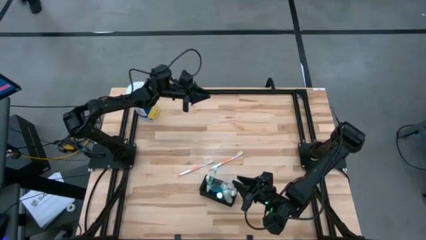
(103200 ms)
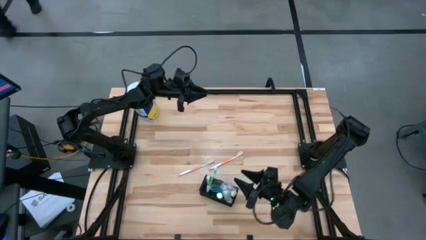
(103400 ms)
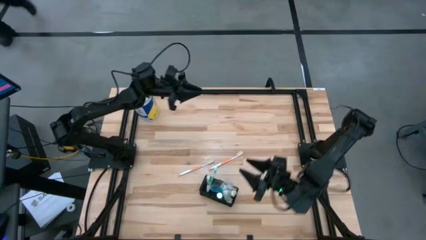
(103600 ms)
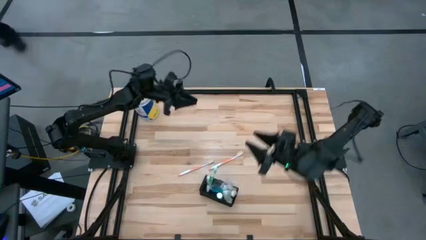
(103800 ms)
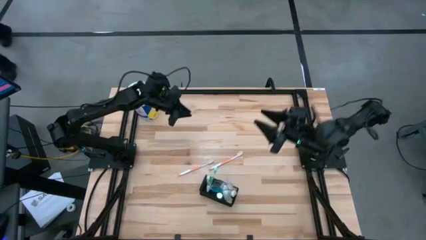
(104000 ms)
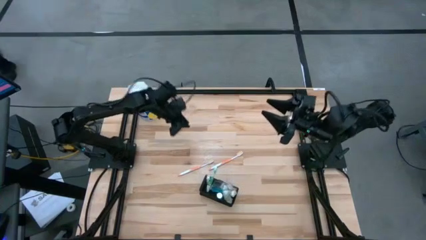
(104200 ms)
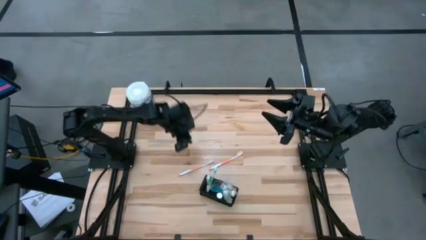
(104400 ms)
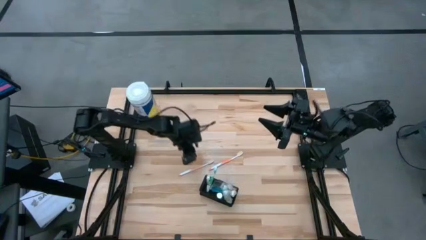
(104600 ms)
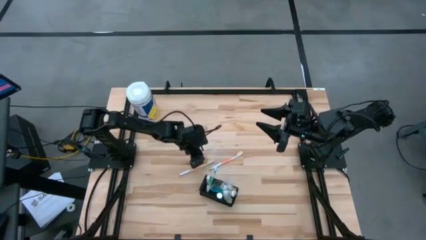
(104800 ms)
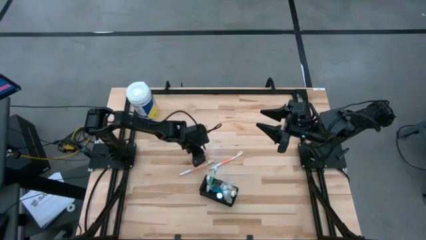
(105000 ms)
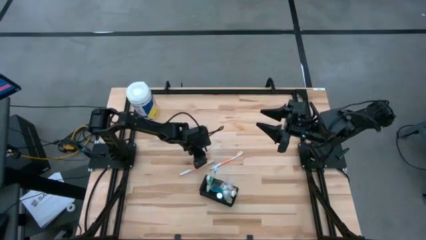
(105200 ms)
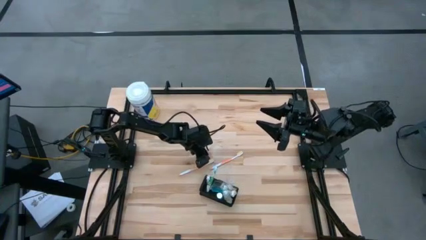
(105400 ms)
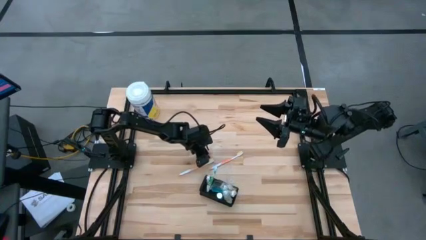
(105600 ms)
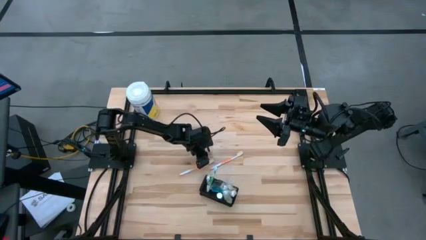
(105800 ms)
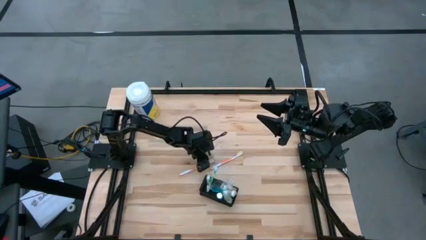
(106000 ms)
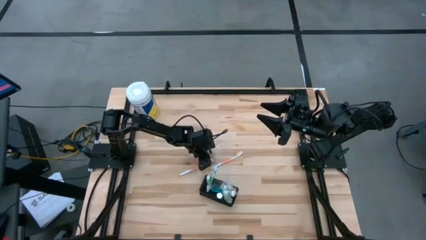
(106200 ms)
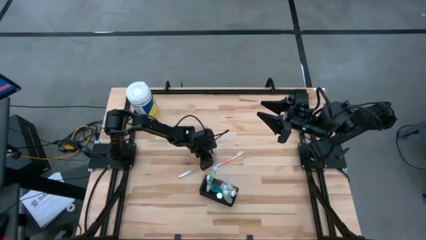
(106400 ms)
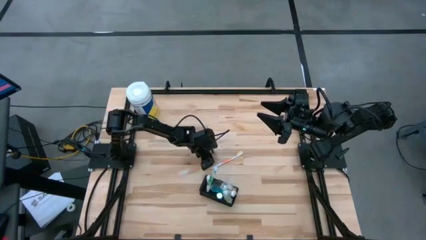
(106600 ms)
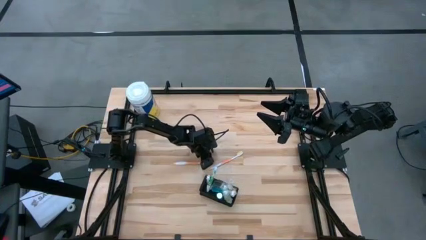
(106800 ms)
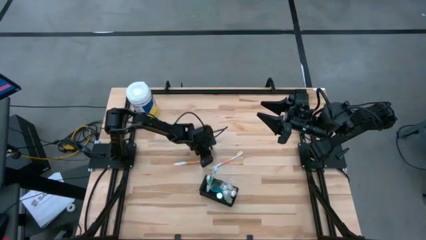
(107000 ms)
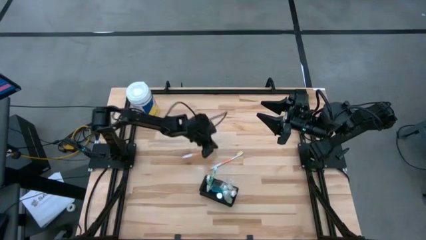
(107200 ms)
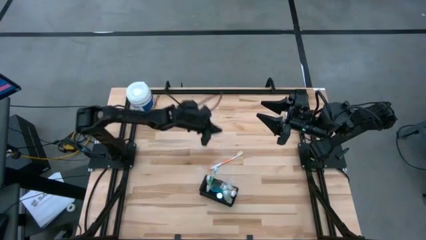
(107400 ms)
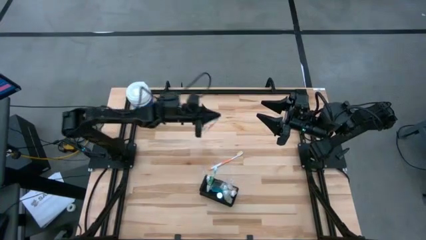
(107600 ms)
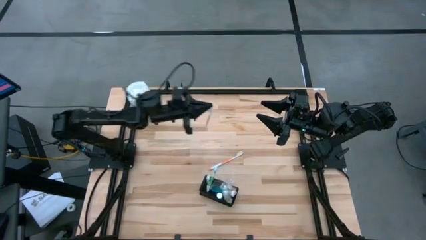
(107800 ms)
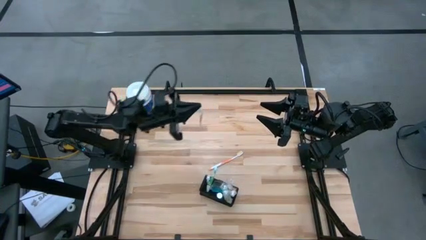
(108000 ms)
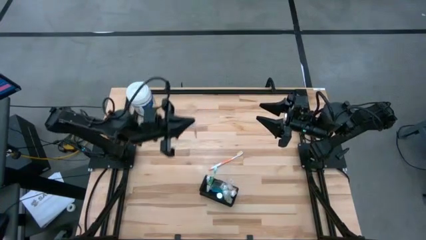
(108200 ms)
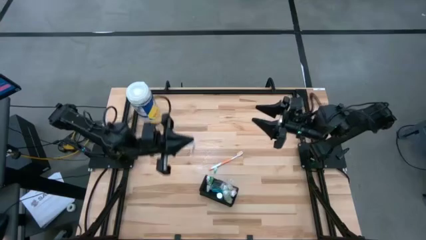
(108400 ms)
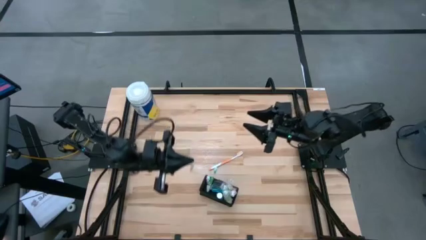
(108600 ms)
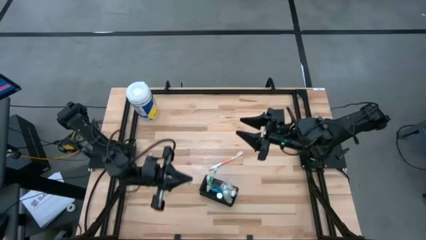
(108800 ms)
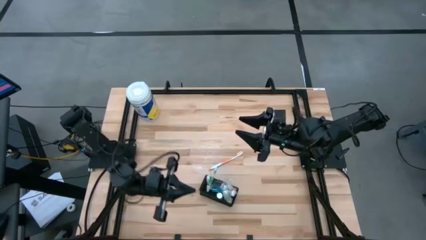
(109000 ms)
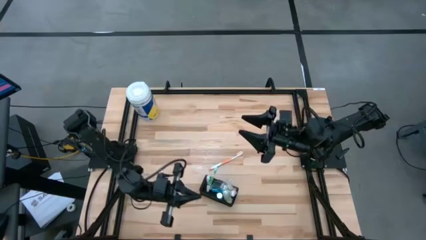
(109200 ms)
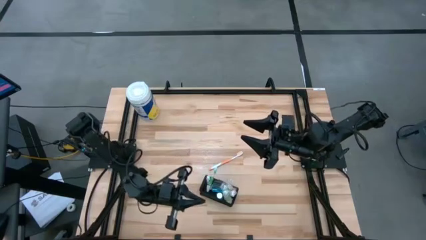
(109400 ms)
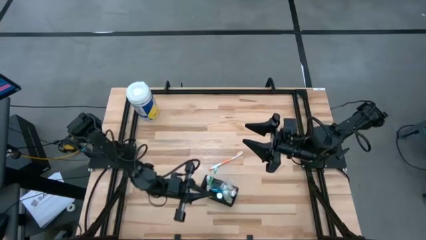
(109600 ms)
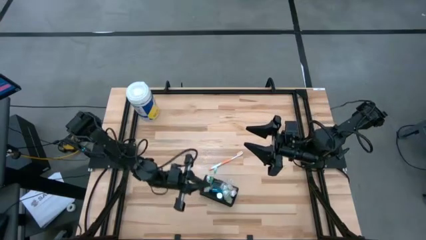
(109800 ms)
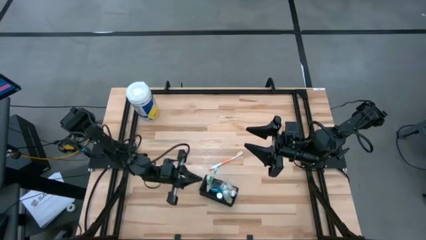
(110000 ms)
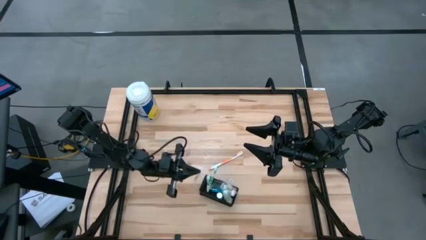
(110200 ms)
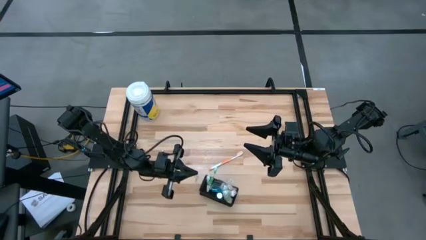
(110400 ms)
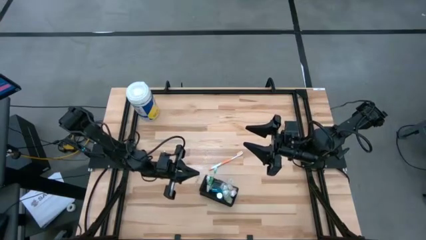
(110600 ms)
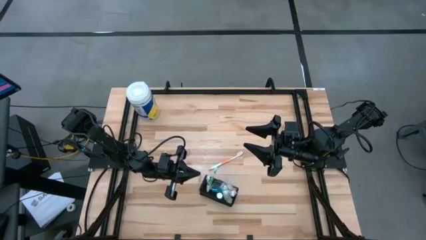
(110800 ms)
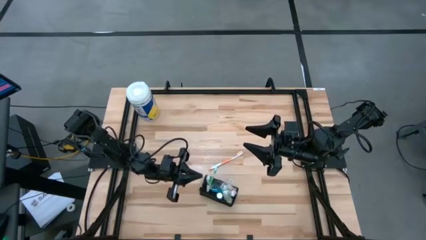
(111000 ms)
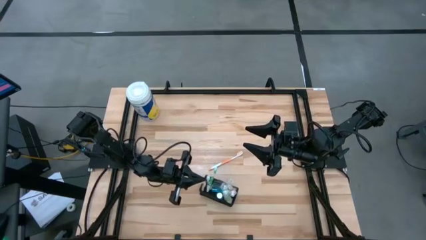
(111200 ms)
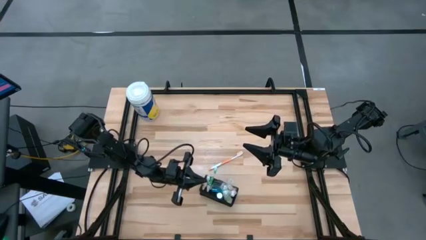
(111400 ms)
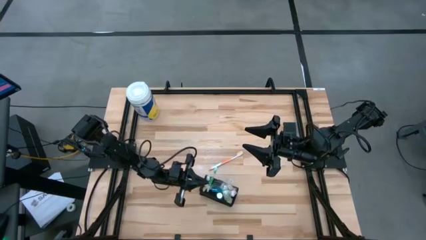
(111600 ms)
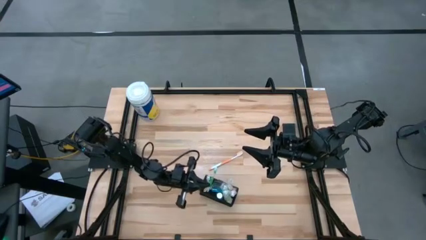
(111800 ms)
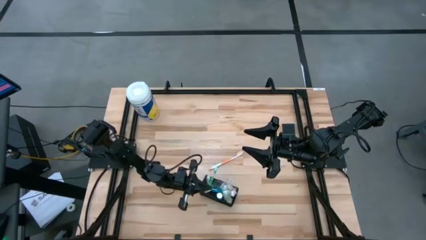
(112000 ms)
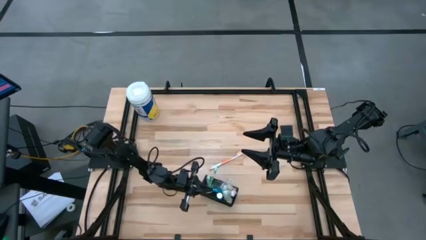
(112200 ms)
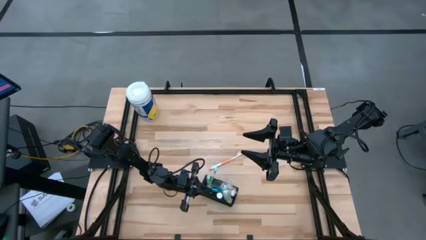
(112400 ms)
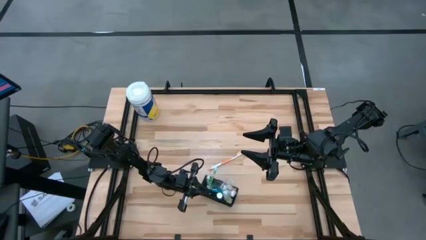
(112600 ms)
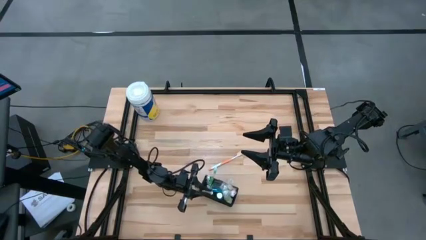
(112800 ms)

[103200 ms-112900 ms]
Task: Pick & Place toothbrushing station
Put the orange toothbrush into the black wire organizer

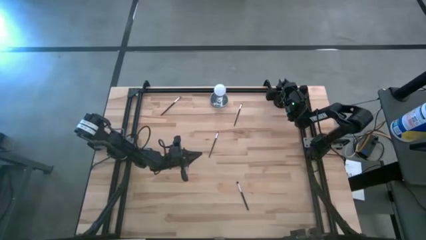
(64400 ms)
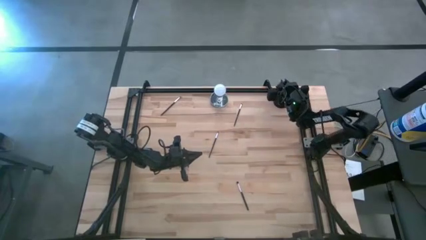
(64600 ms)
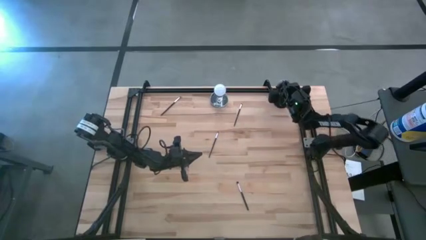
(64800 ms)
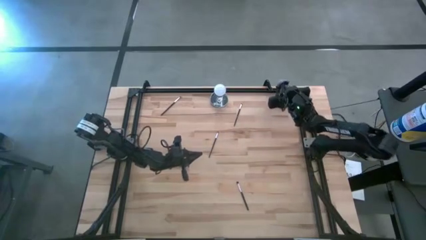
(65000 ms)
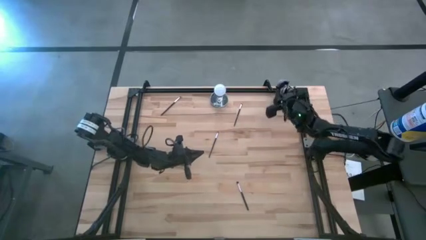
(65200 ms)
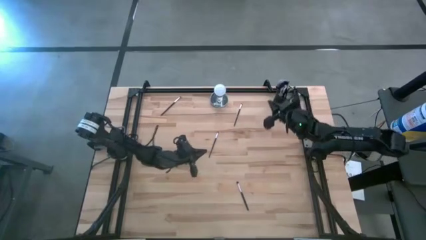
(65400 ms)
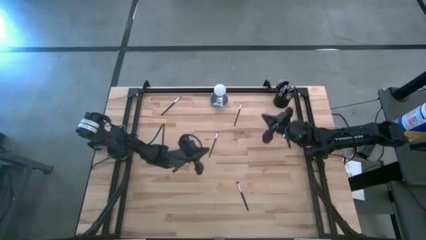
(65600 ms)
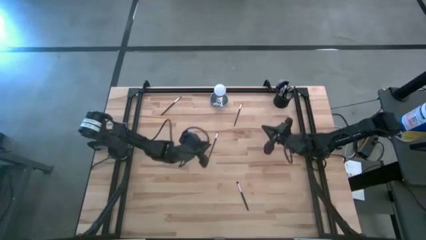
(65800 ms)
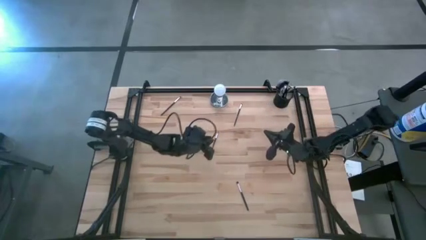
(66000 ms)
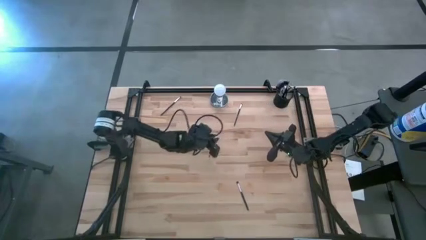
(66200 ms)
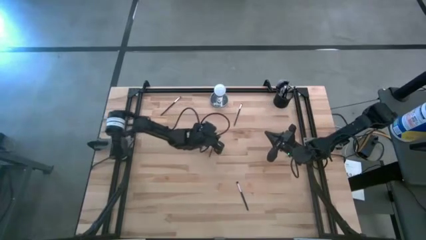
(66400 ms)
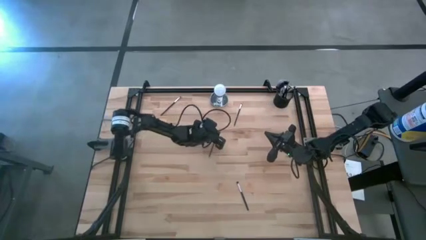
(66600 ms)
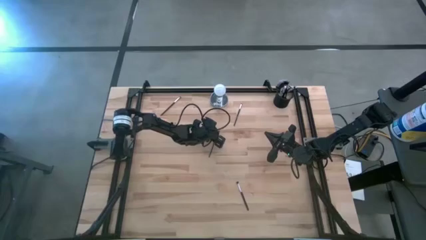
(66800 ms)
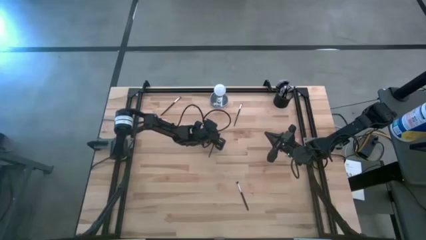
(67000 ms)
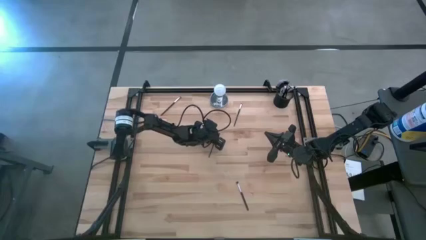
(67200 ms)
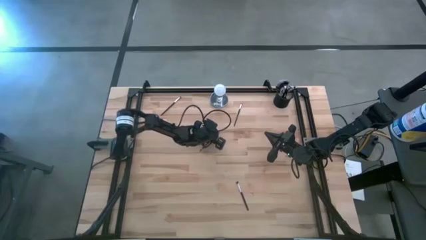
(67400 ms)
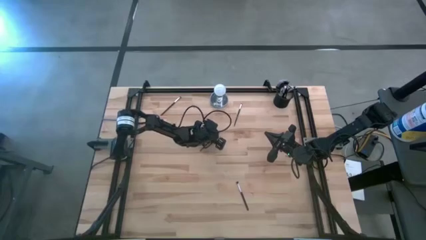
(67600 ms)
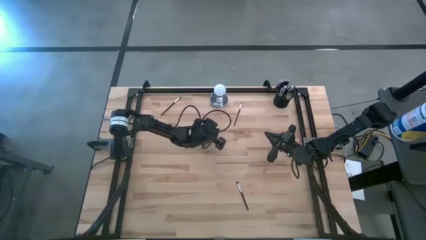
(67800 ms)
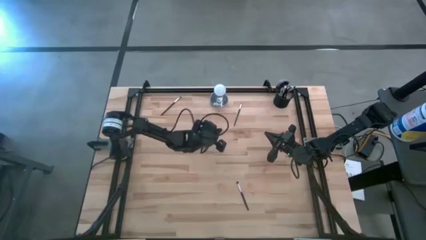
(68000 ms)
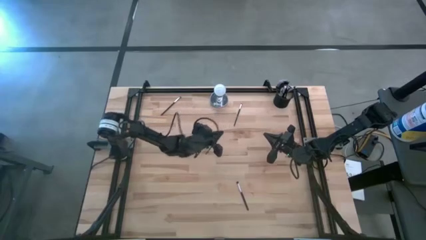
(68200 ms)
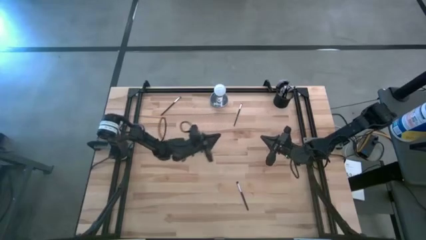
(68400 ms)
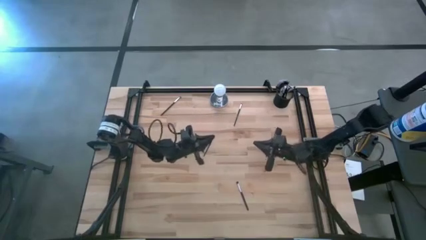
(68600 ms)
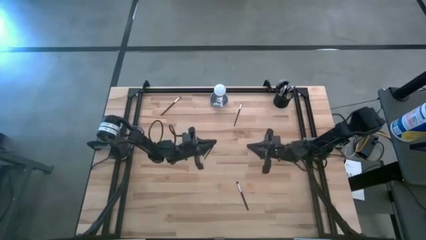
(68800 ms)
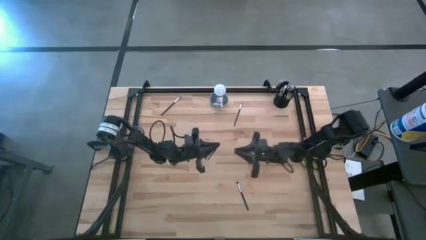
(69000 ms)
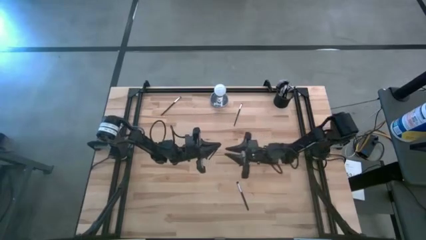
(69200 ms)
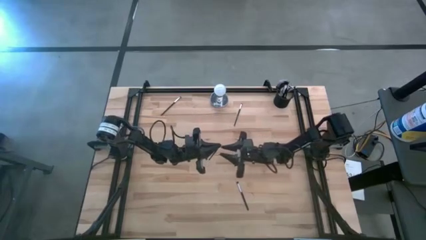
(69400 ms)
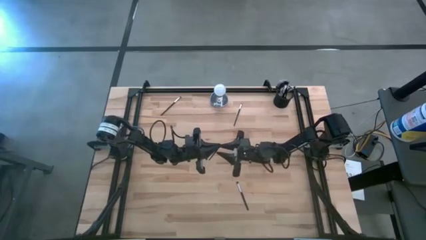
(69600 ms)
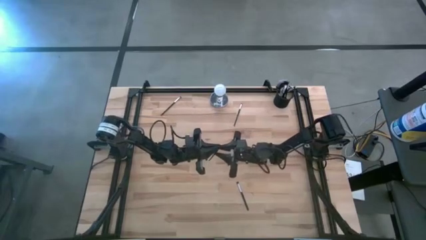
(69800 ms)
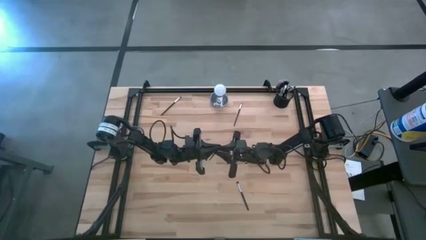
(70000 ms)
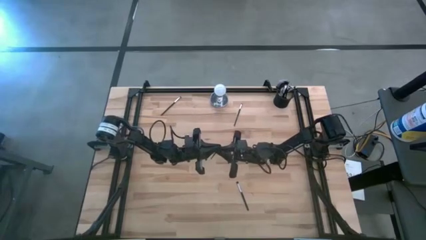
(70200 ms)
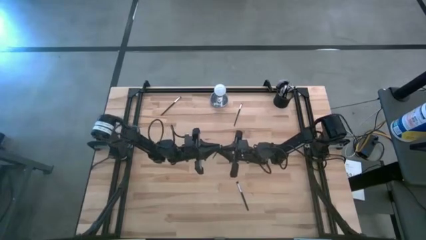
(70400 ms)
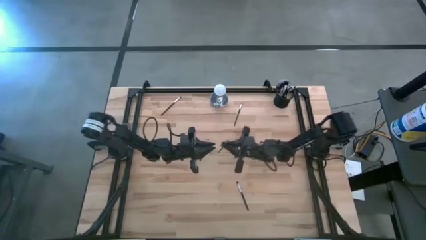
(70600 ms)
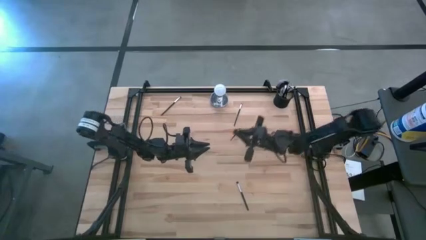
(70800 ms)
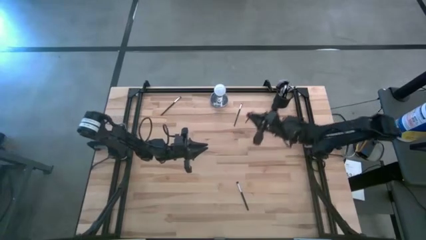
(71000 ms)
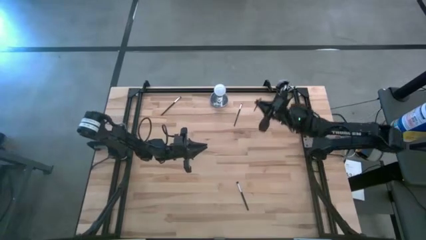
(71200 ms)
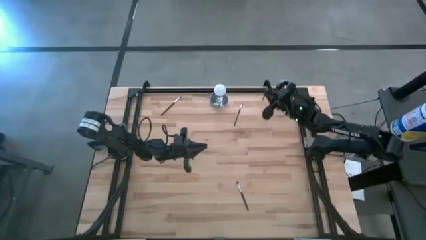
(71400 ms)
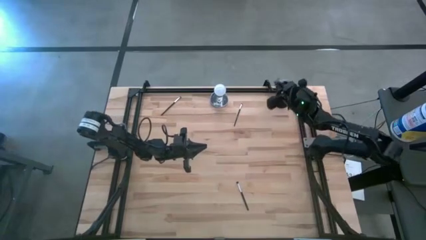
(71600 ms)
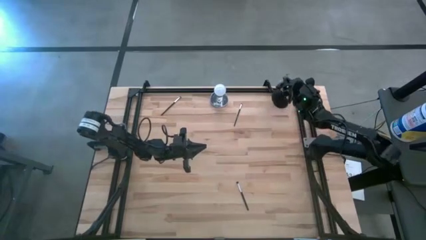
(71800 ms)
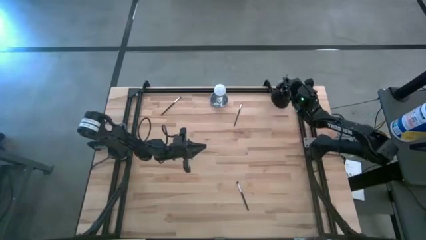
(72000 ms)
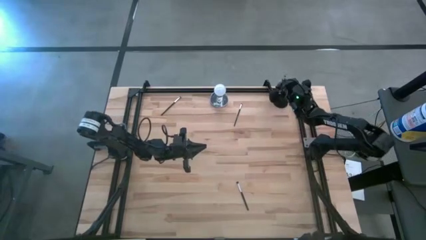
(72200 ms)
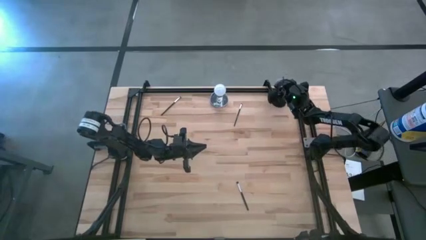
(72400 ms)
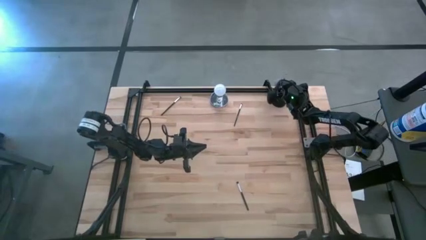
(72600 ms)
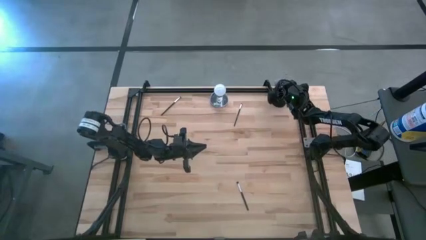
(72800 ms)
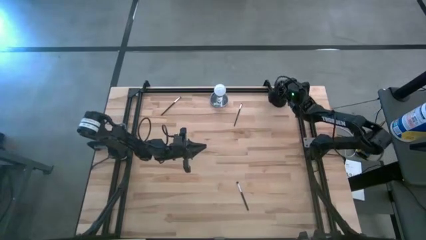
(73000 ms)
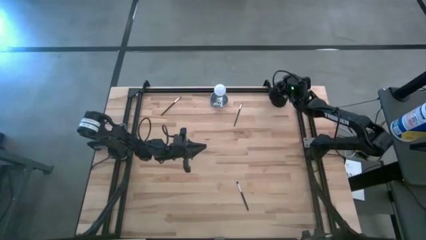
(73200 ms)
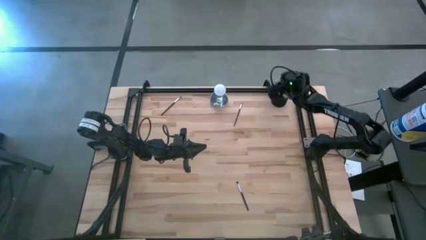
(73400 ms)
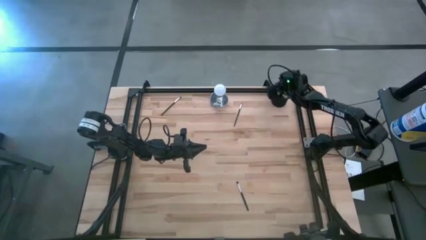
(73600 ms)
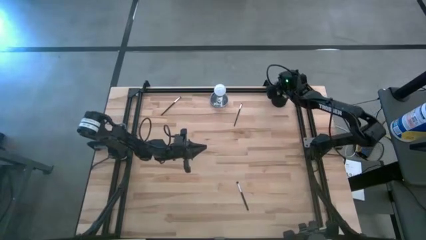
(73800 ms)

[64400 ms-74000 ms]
Task: Pick & Place Makeup Supplies
Put the makeup brush into the makeup holder
